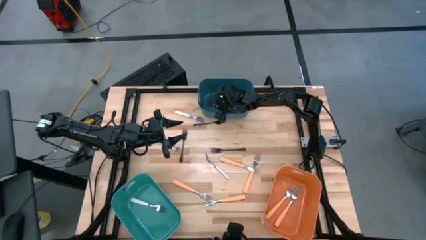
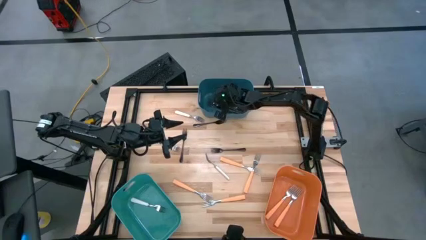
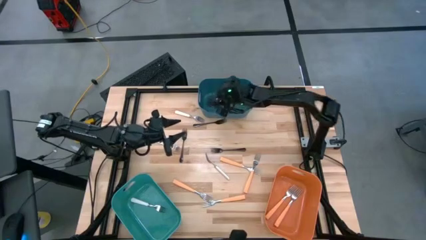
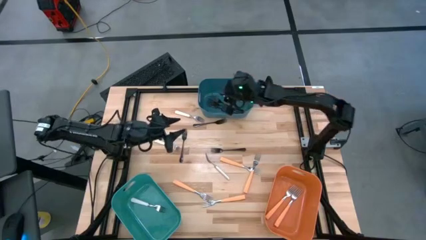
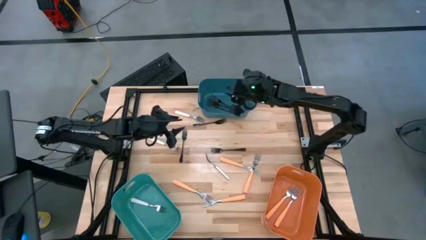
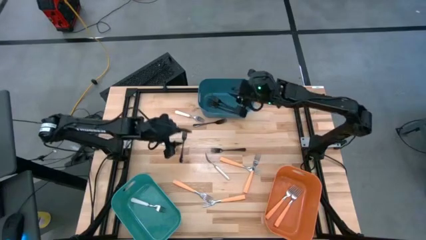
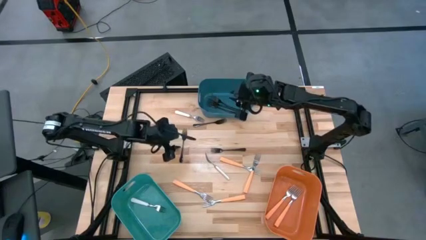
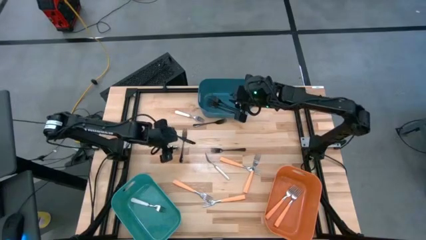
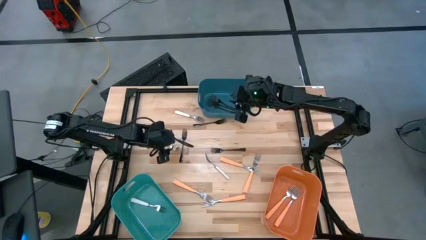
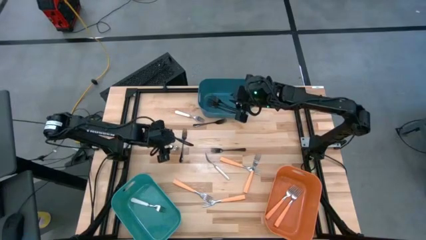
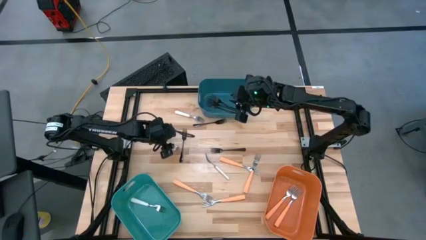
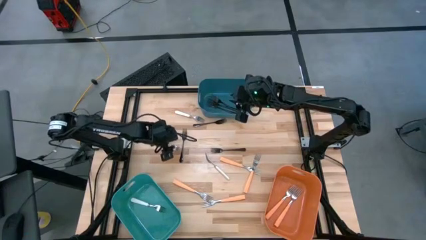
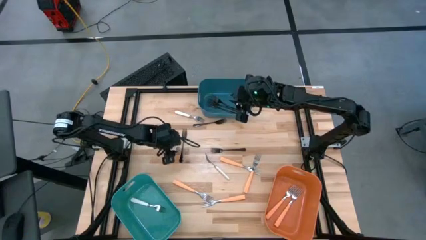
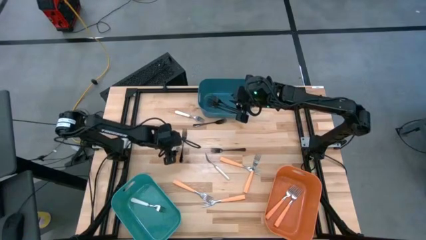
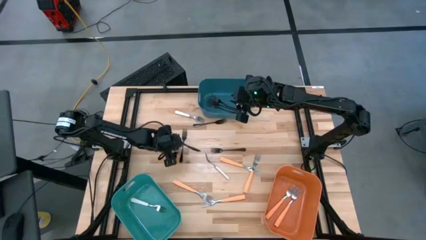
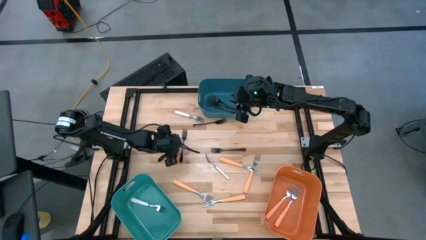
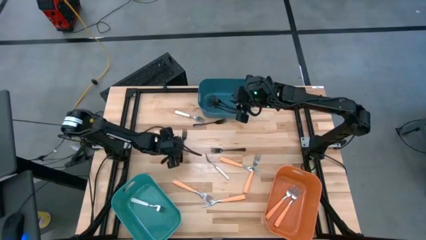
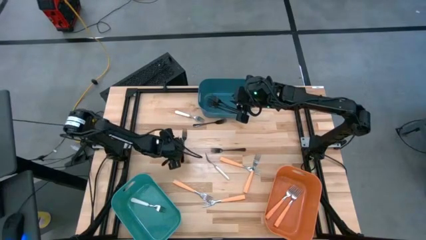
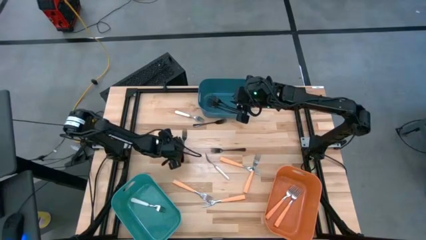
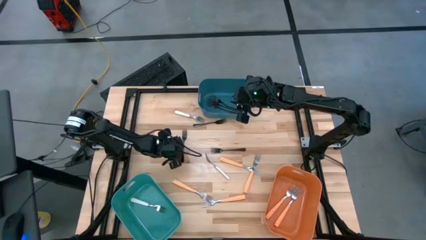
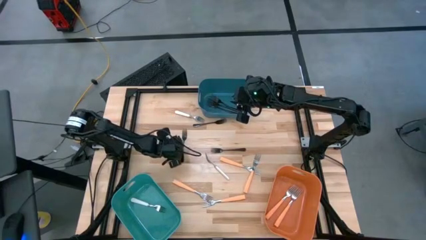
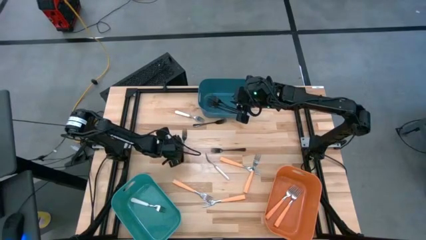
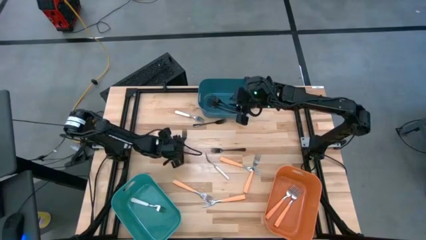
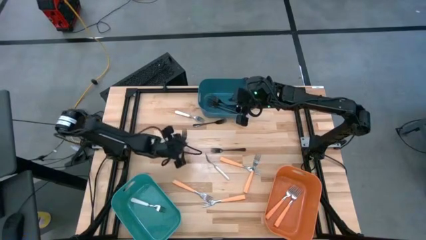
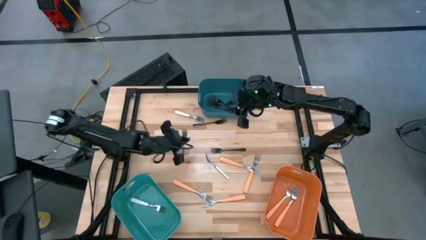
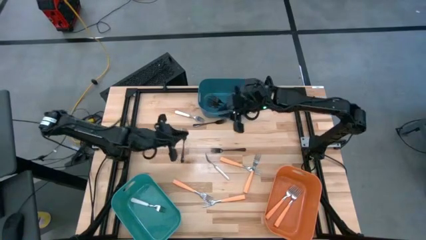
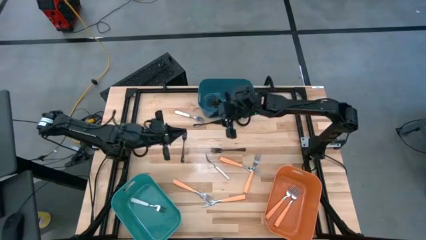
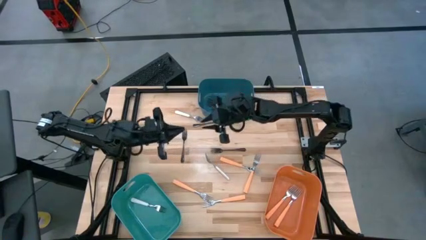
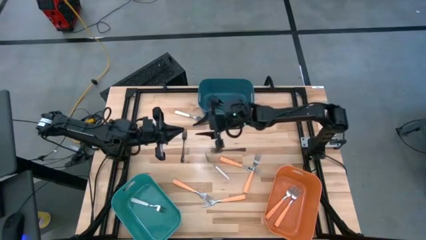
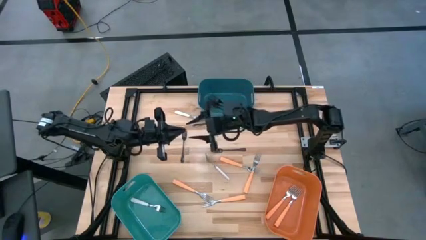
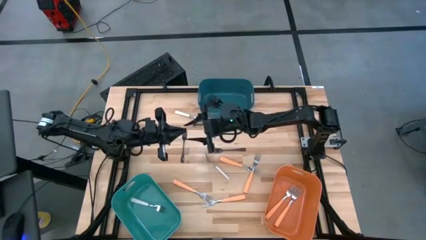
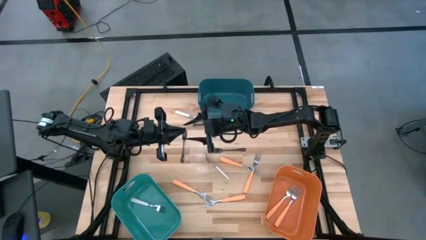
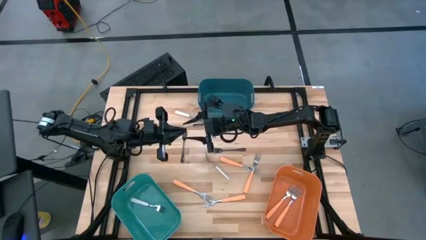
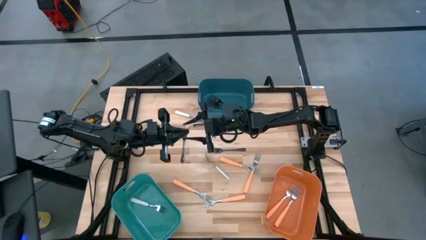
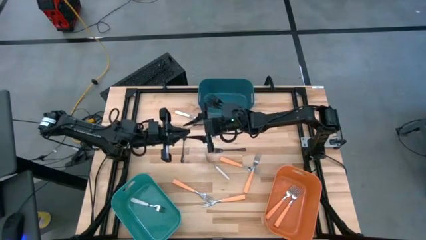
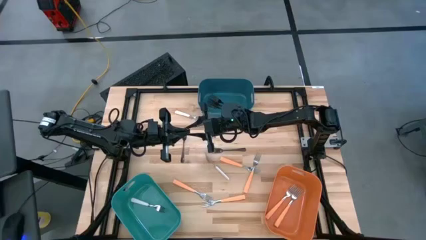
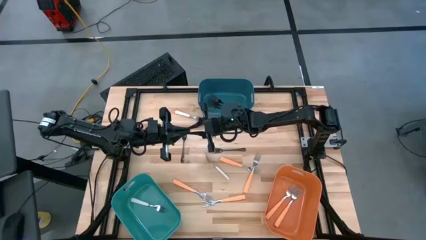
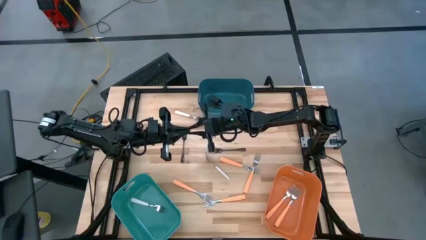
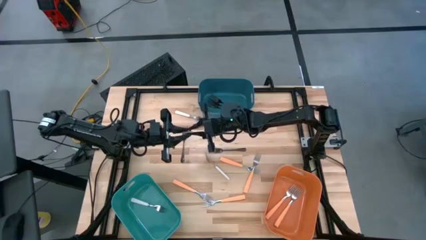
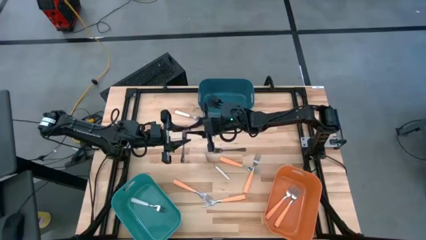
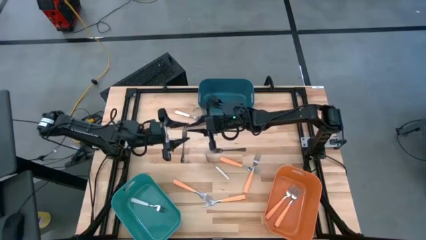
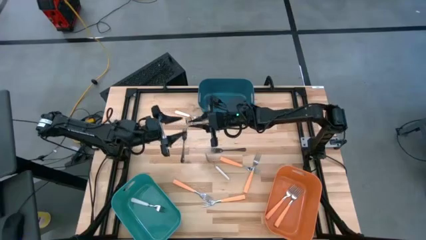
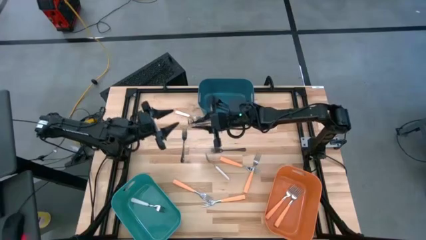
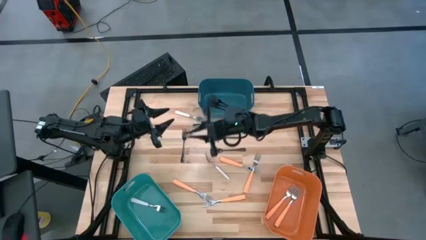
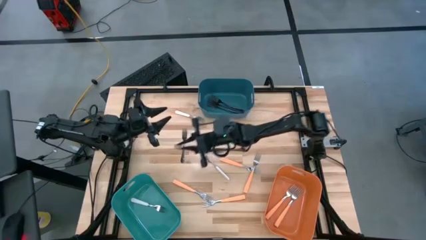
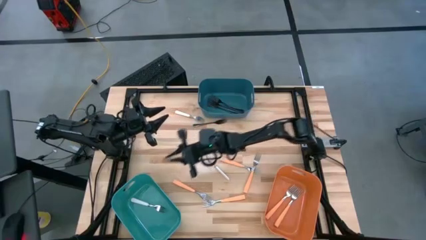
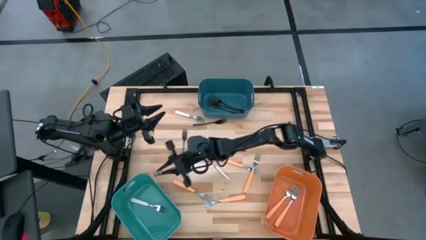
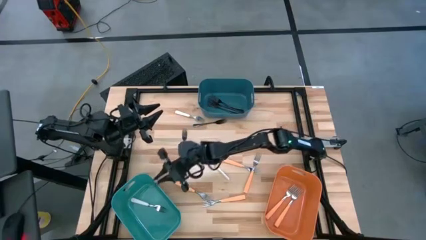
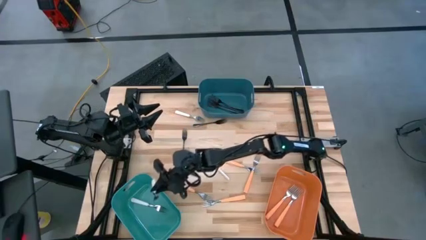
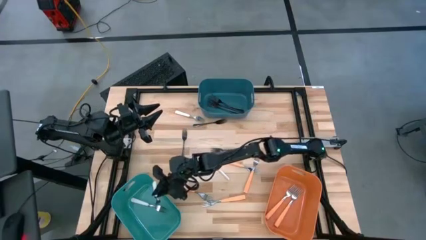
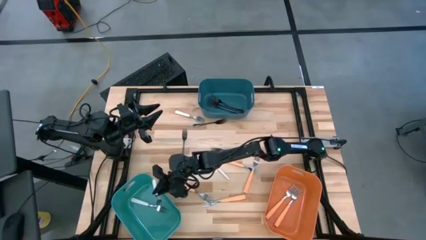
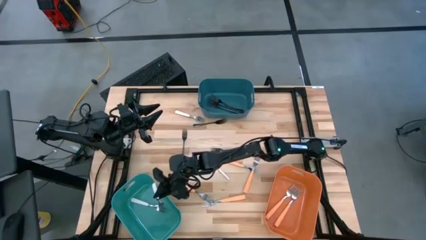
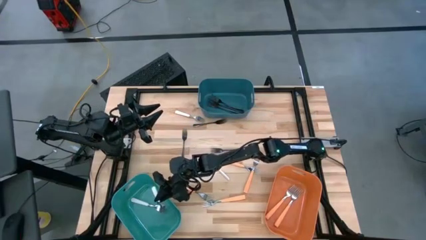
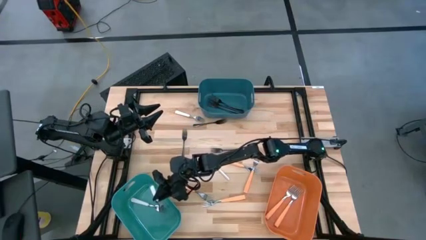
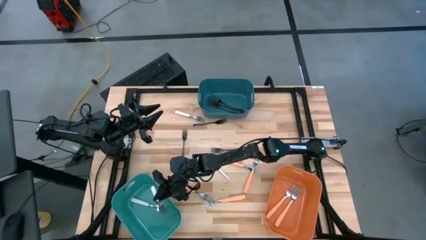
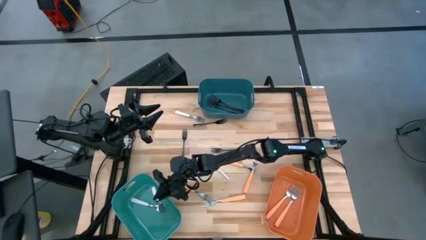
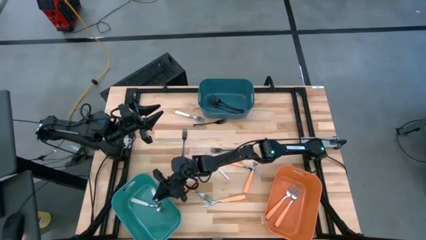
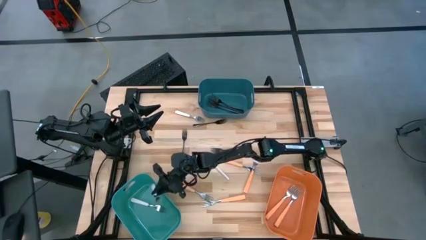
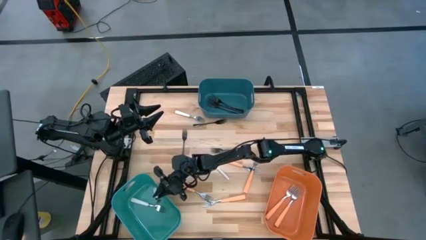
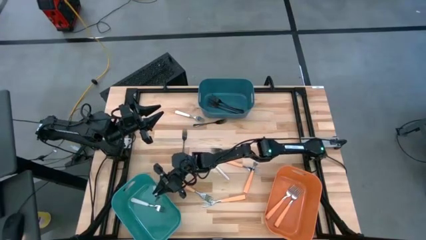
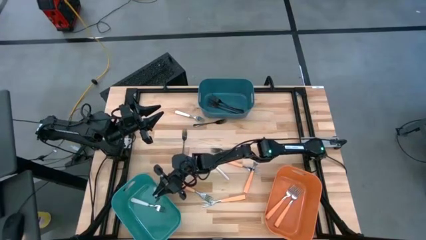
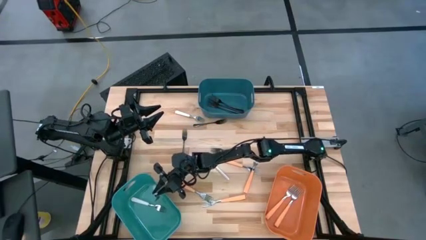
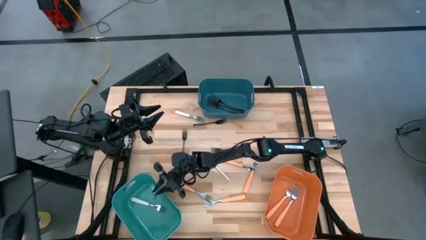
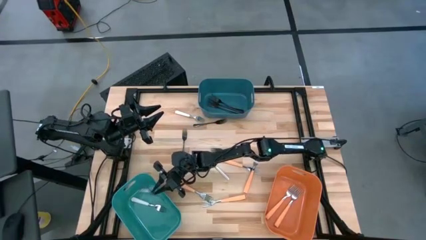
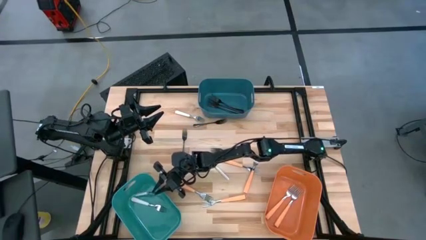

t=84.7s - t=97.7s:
Task: Sort silverware by color (type)
Put the white fork into the green blue bin
